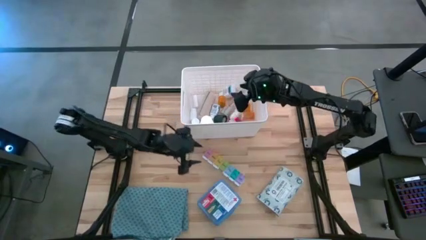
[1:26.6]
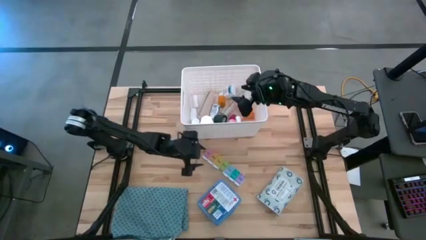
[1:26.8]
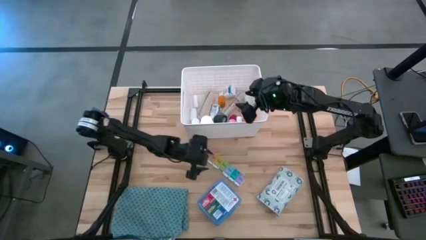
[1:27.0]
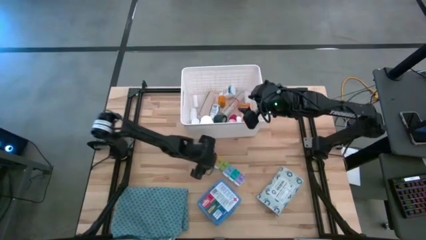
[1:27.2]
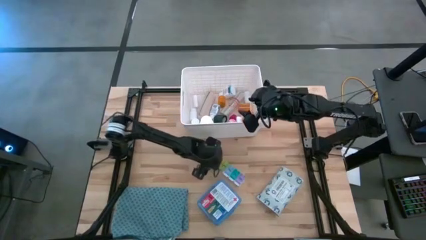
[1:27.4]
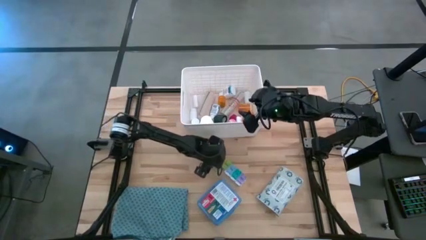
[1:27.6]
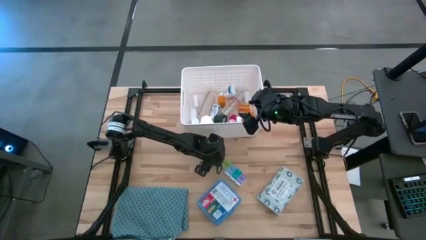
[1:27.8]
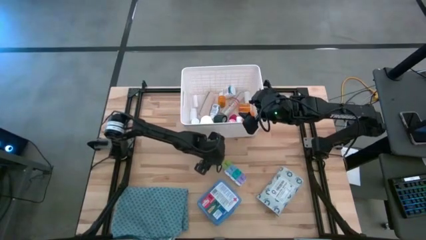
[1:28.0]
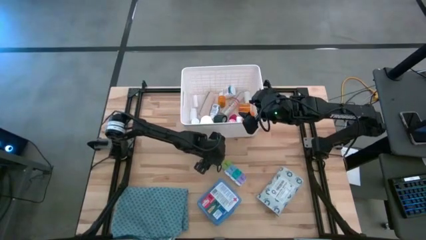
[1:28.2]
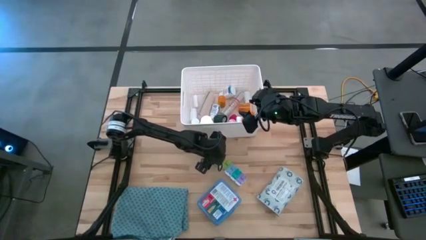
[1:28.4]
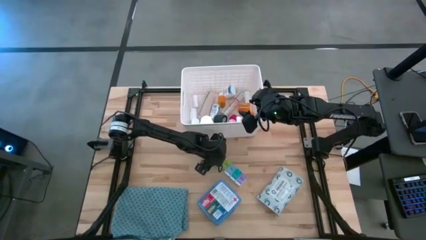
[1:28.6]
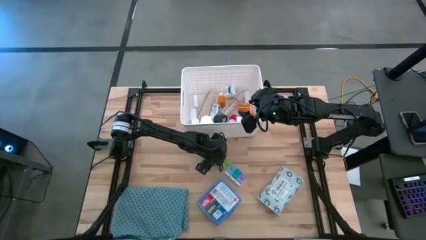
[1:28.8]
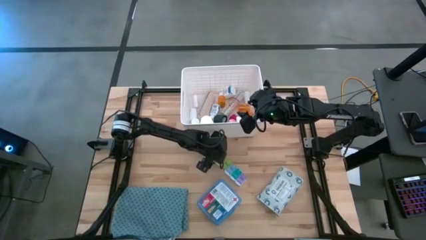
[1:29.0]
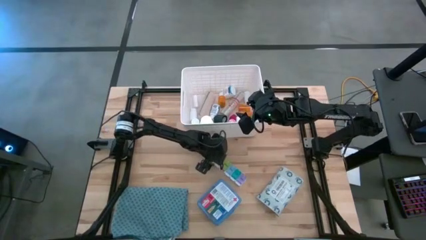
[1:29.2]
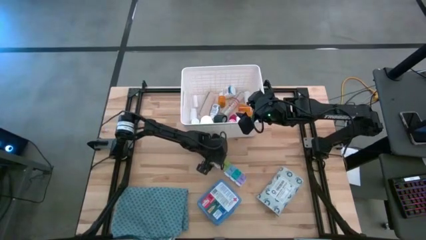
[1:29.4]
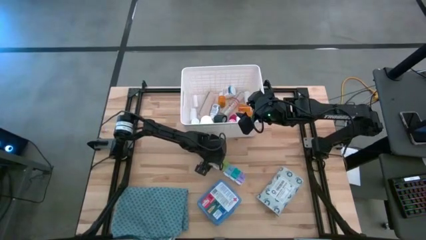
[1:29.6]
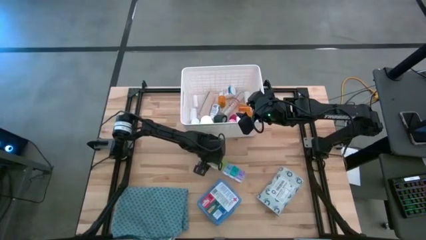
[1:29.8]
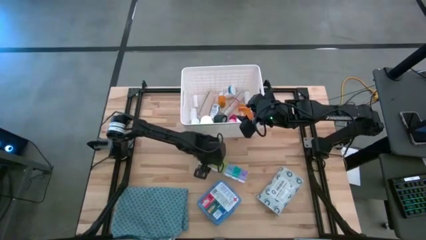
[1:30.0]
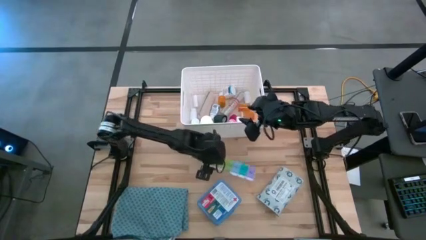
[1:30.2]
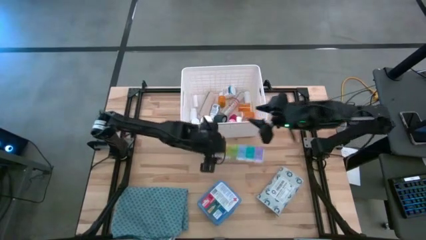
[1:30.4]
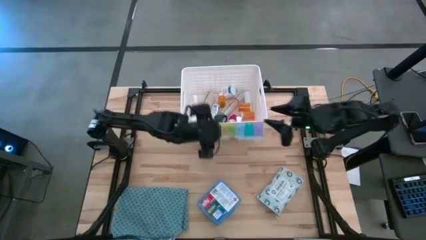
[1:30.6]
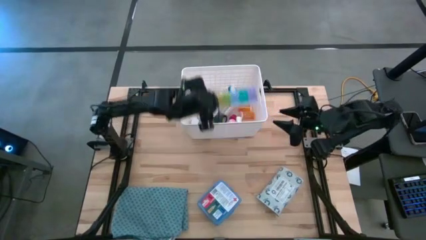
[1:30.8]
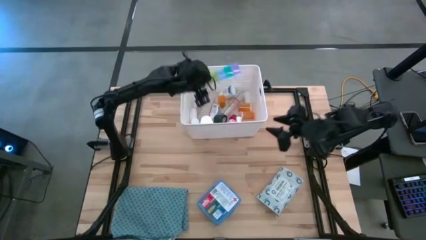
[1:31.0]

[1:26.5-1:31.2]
Task: Pick & place medical supplies in basket/bin
Put the medicine organizer into the bin

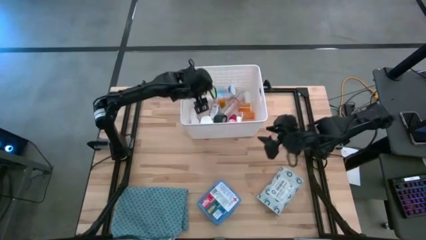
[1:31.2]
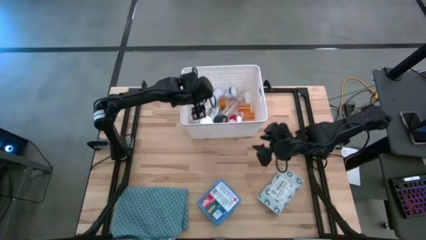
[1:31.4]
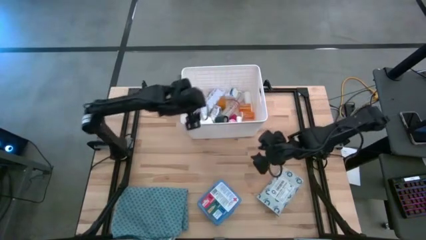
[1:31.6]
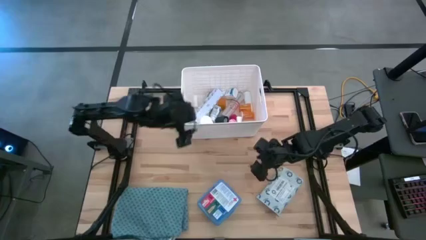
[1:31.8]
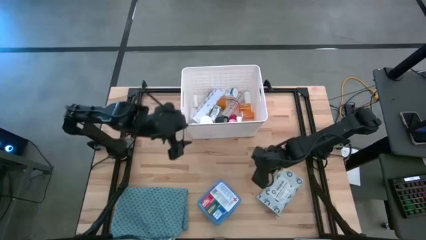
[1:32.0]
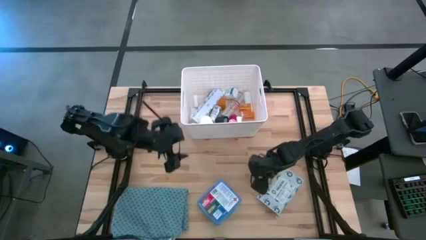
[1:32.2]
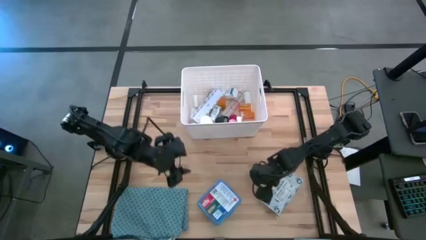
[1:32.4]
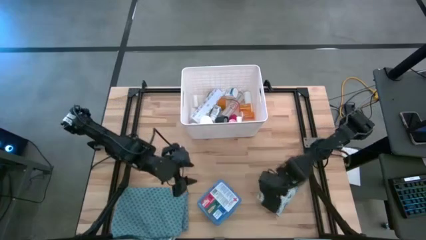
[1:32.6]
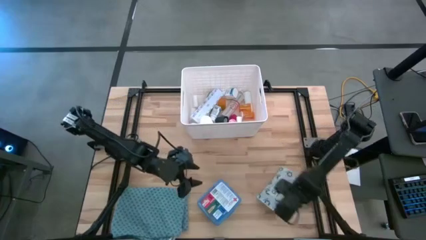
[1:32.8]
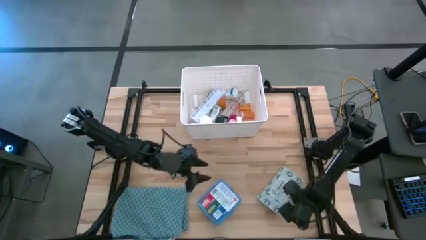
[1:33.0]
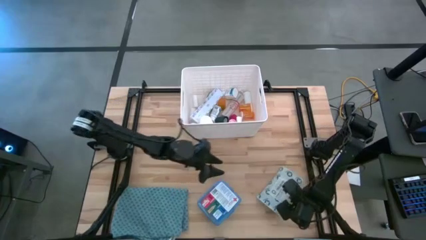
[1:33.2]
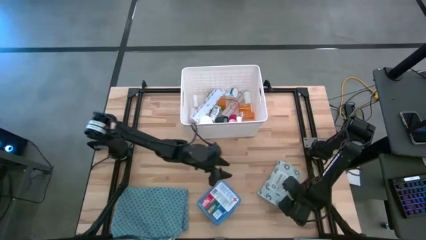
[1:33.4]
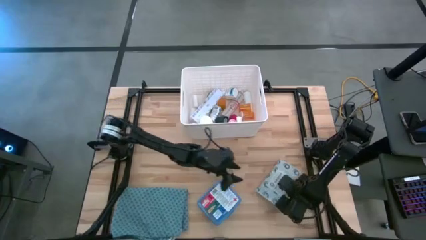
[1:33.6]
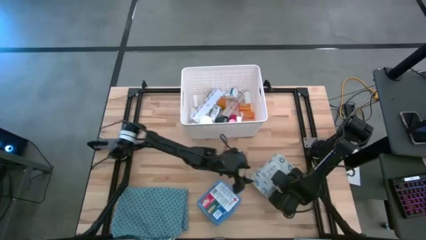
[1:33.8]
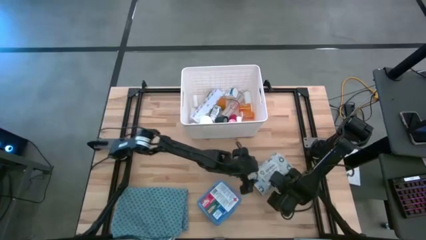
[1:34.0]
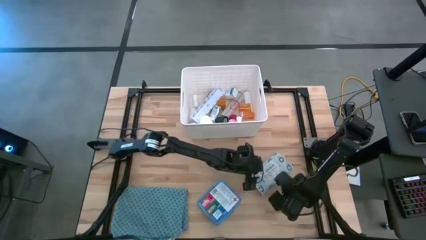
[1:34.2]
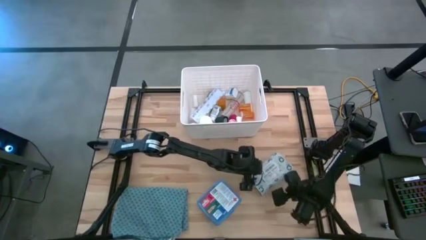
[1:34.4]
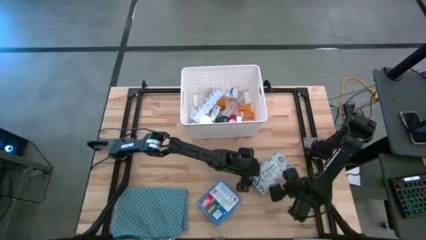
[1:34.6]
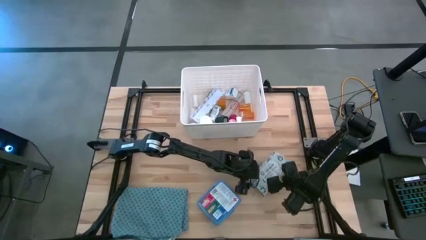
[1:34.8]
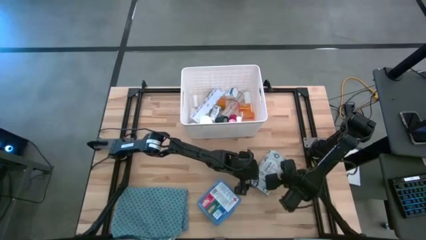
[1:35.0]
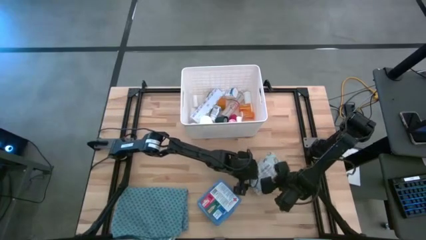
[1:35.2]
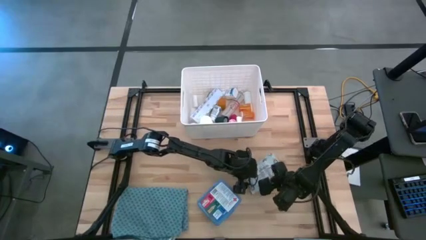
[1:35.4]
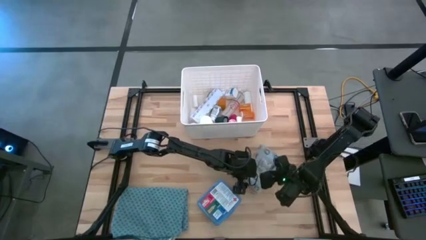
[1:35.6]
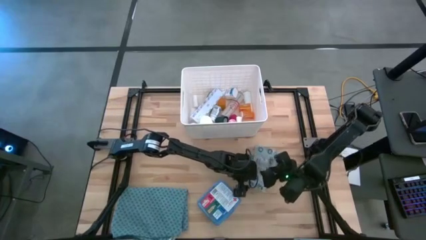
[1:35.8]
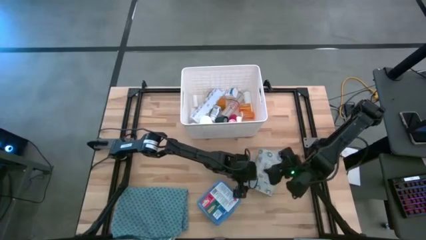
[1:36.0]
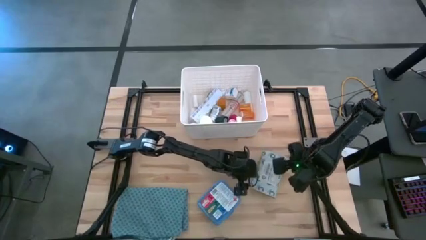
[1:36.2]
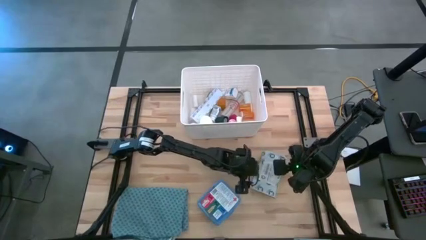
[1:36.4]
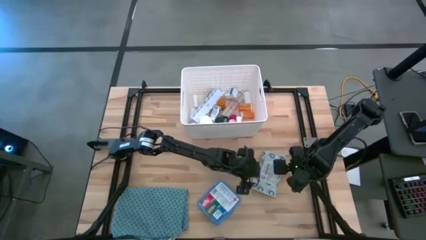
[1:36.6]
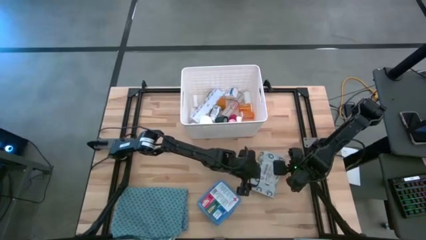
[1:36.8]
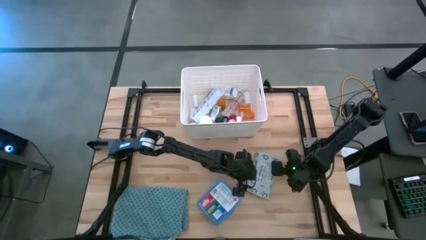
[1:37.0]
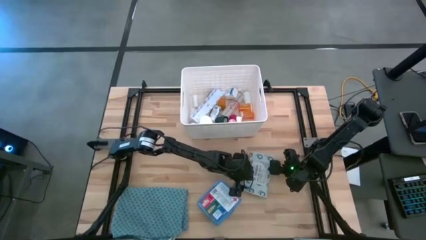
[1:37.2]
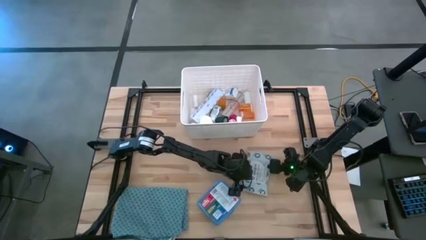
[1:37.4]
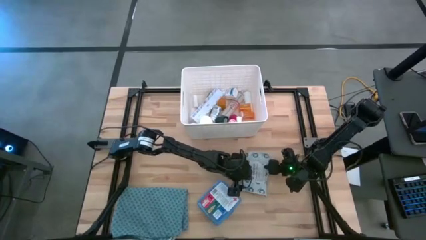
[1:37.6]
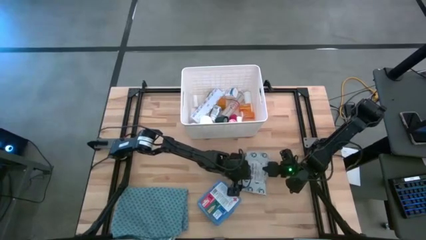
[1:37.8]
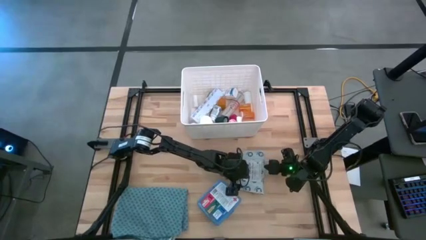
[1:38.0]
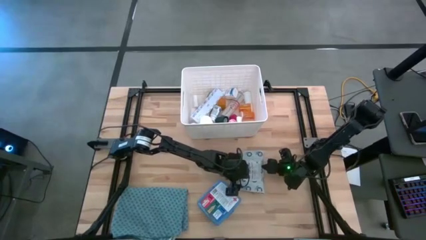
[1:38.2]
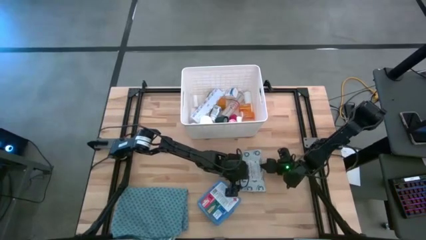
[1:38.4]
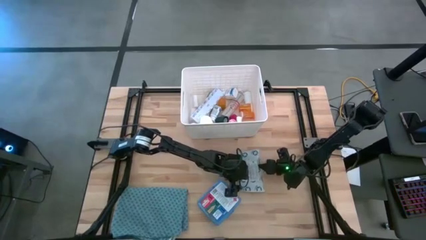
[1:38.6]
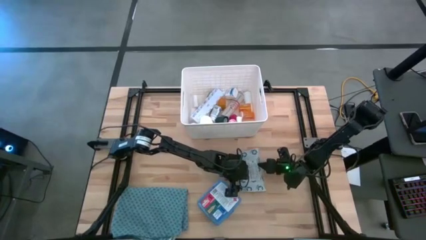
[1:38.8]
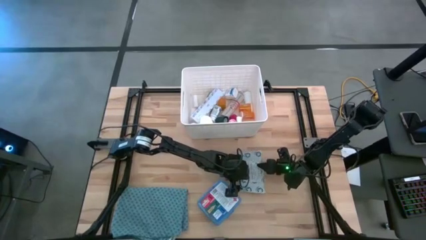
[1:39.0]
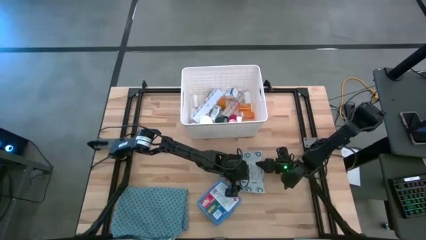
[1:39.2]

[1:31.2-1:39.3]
Put the mailer bag into the bin

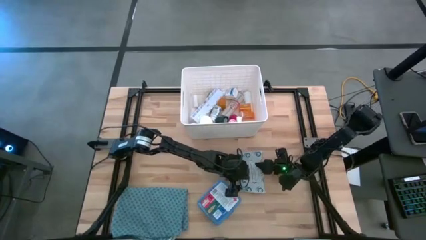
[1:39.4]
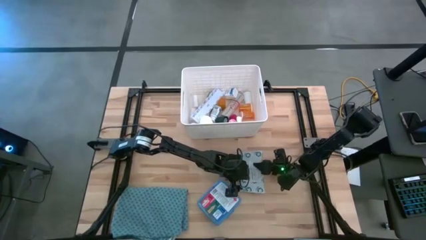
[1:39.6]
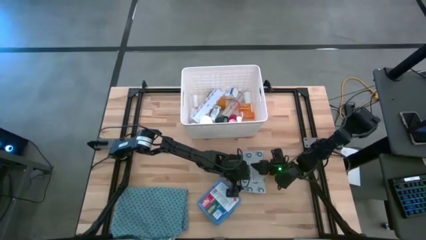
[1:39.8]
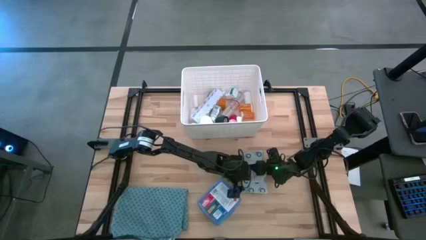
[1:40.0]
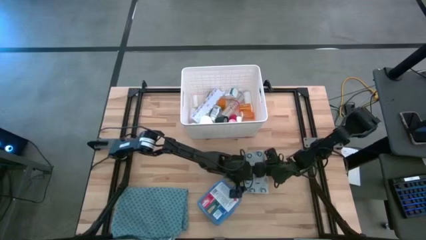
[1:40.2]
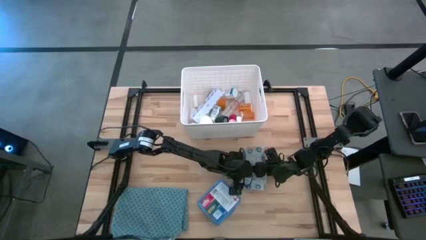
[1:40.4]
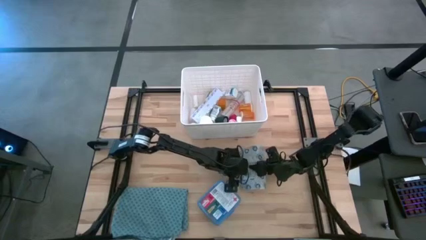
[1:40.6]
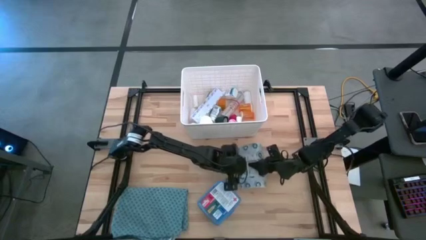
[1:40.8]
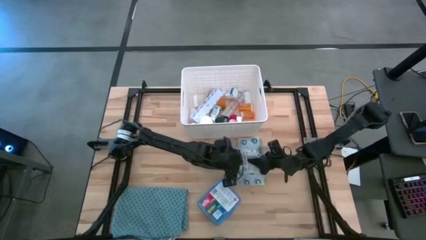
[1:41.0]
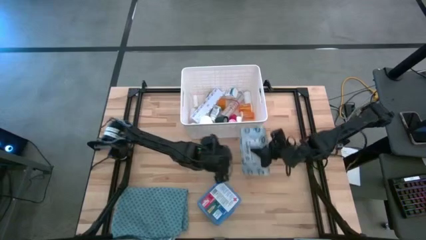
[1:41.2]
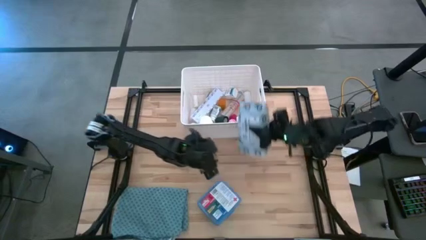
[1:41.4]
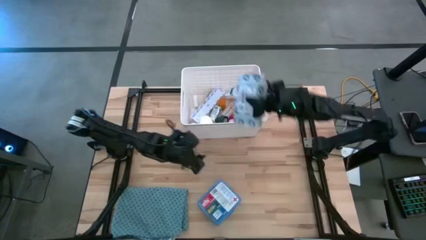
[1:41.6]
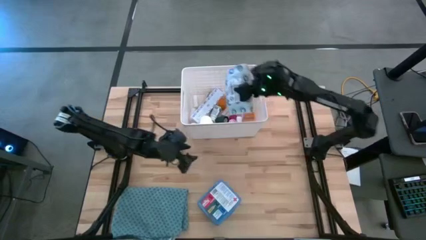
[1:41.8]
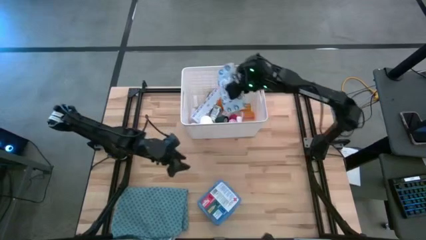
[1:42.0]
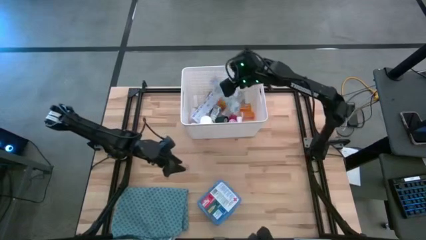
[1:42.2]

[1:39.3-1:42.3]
Put the mailer bag into the bin
